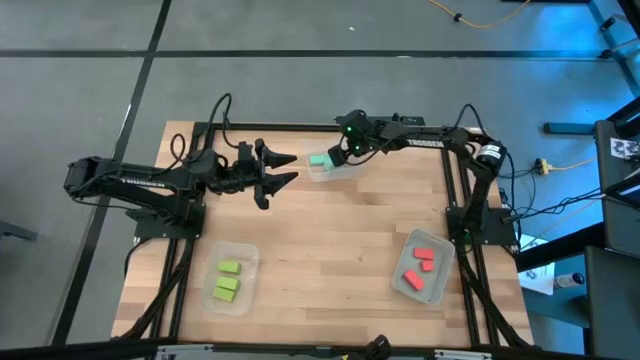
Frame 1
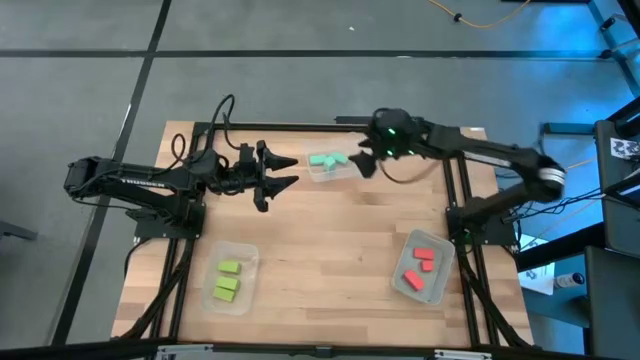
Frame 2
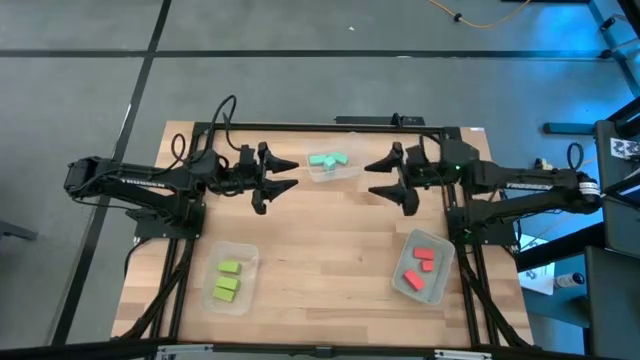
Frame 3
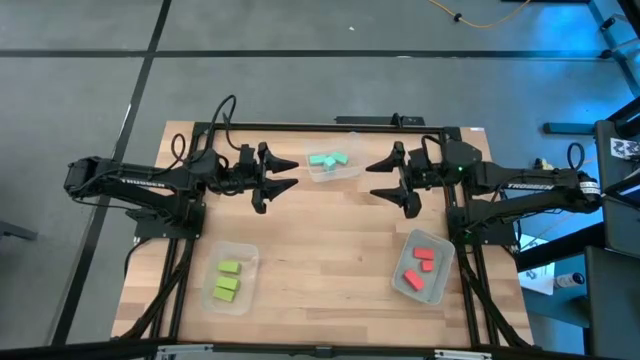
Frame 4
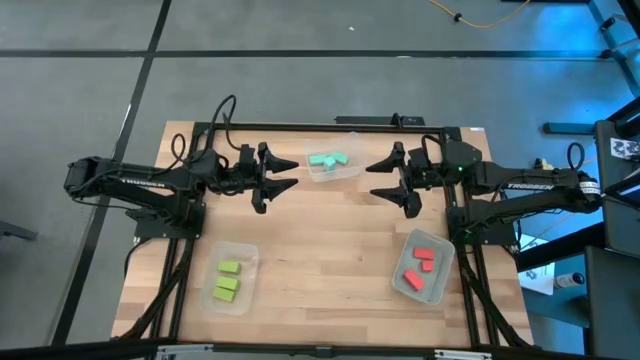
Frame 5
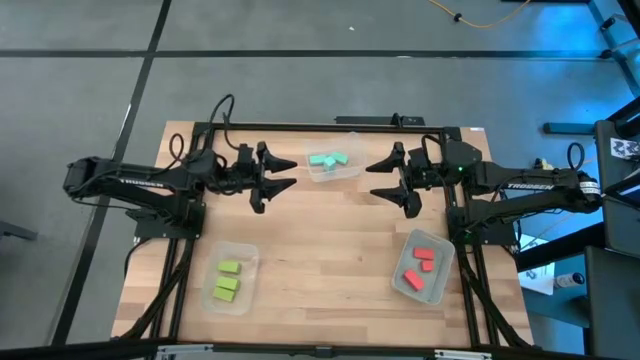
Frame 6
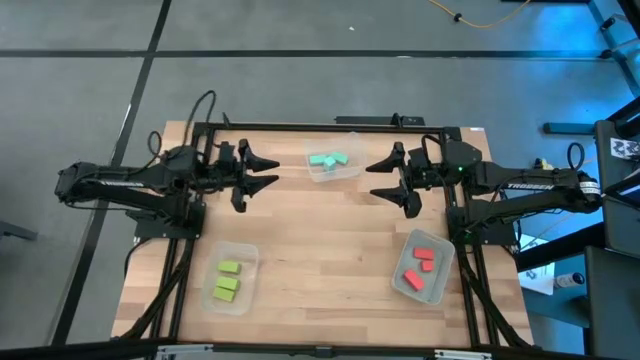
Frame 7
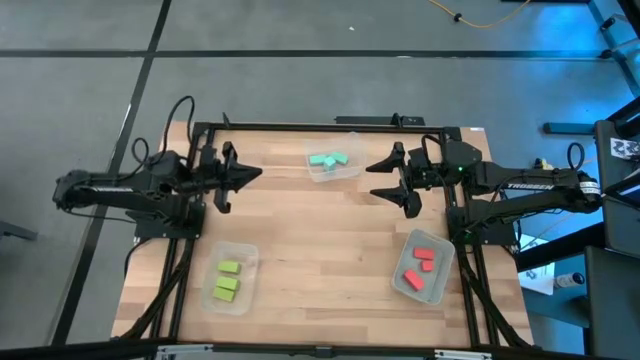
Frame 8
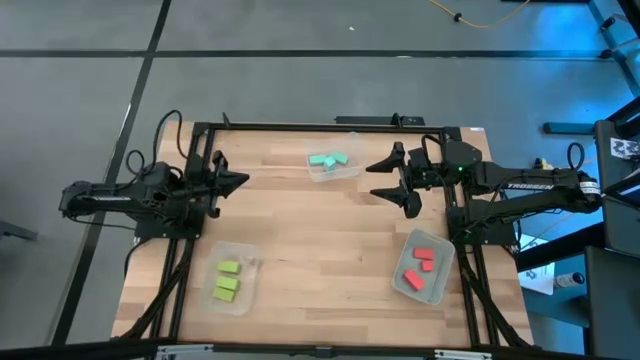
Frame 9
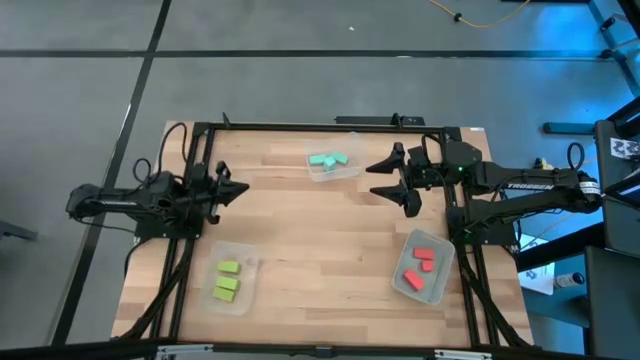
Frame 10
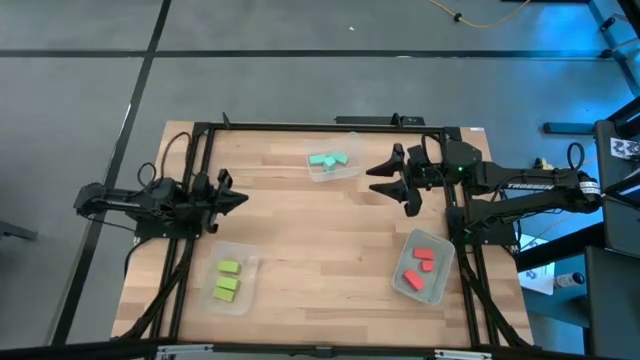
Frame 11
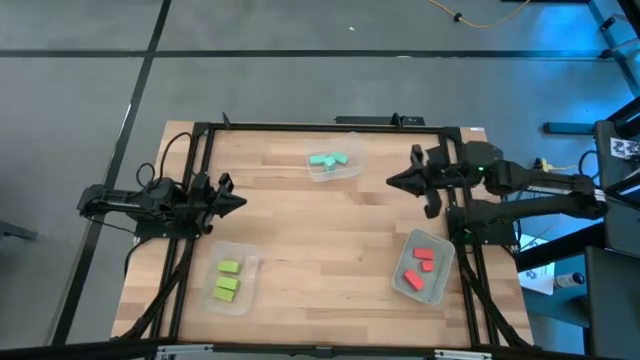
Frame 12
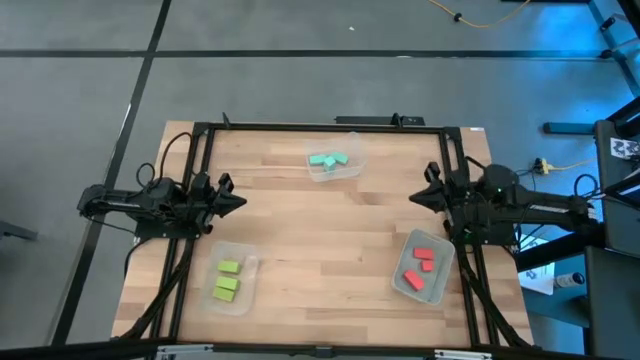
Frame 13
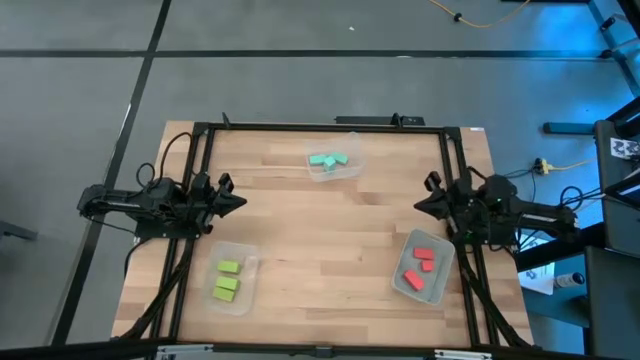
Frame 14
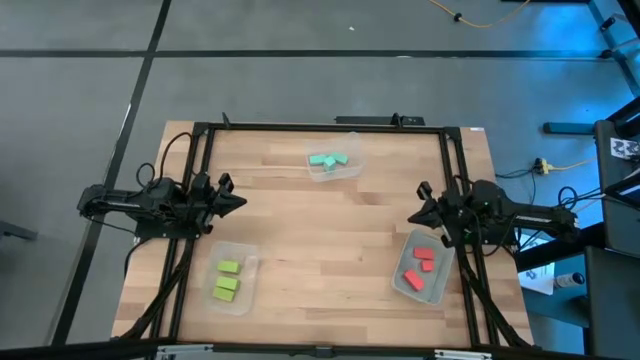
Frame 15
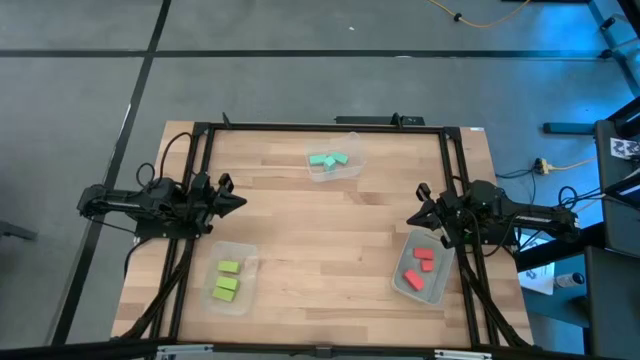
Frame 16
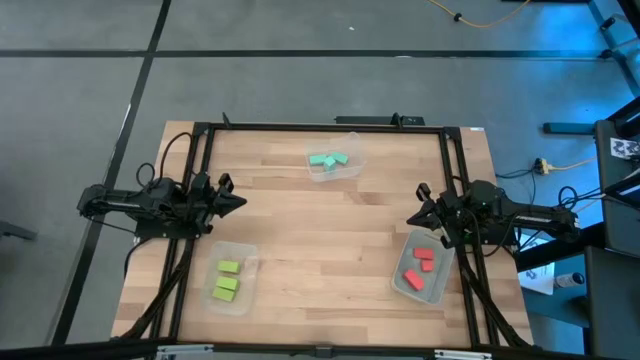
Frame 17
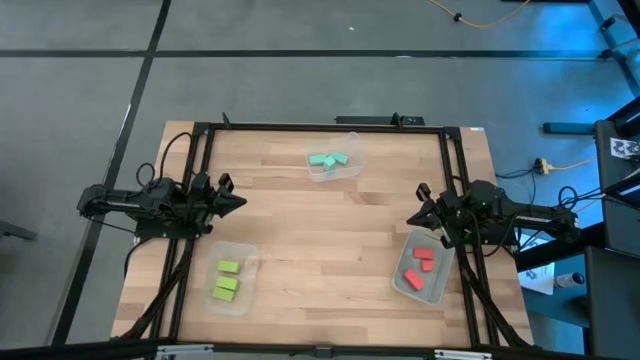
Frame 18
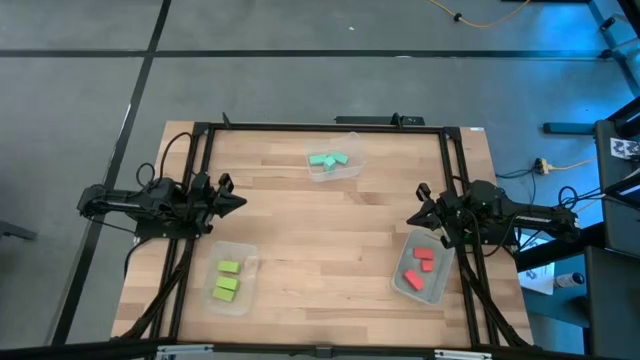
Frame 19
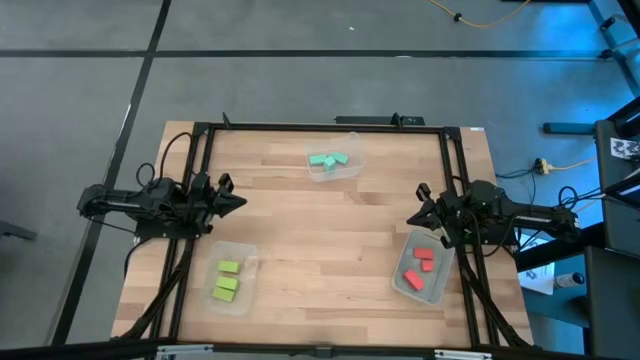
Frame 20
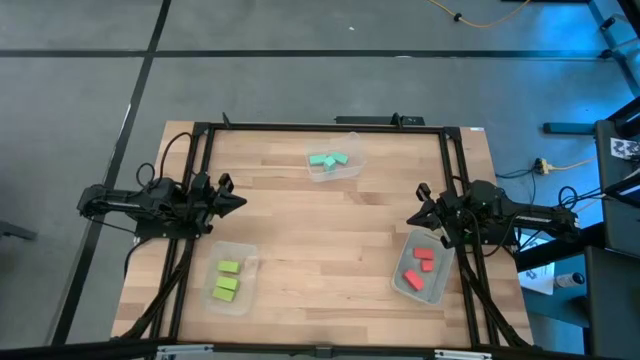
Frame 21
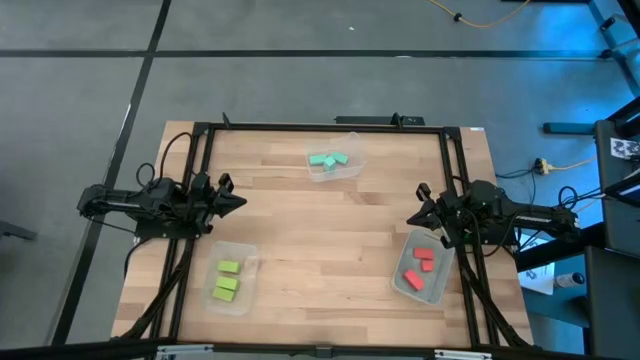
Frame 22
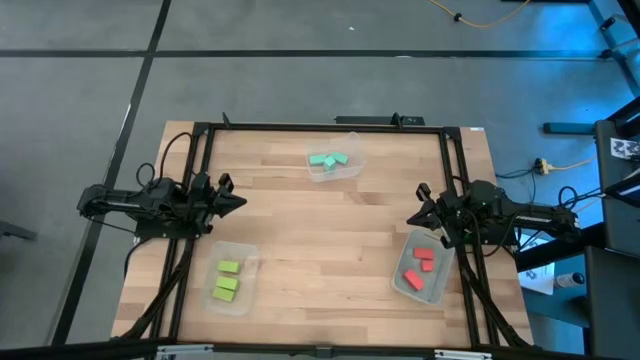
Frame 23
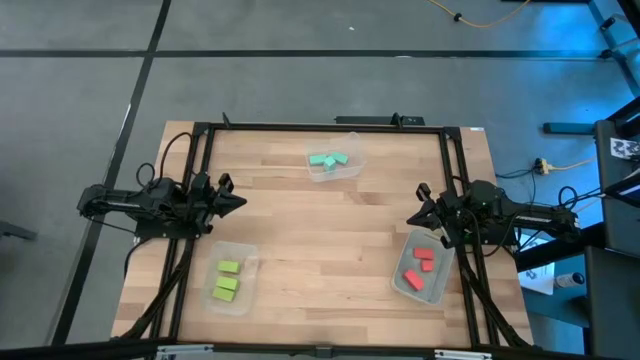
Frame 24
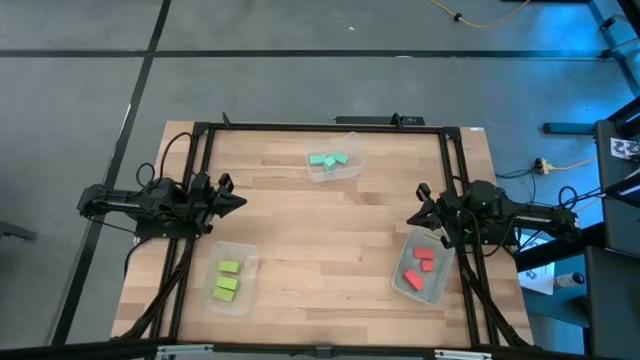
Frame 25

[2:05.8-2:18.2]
Task: Sort & place blocks by color
Return to Home Position

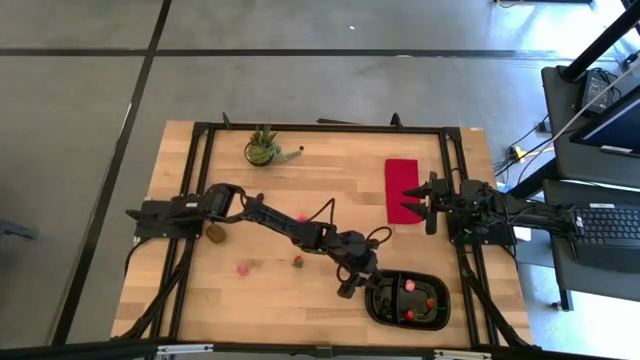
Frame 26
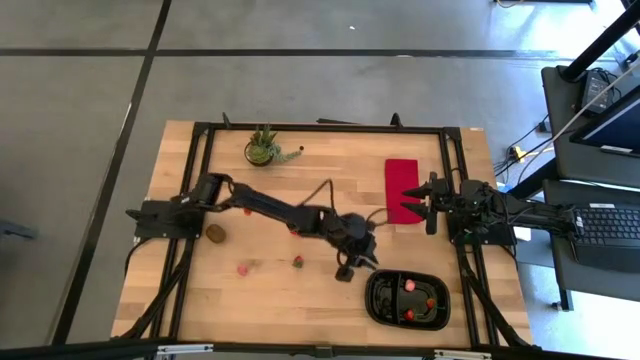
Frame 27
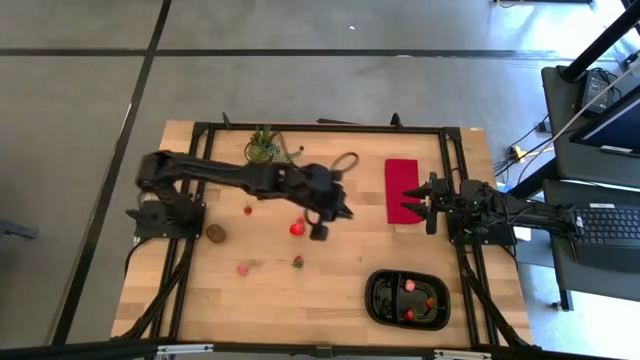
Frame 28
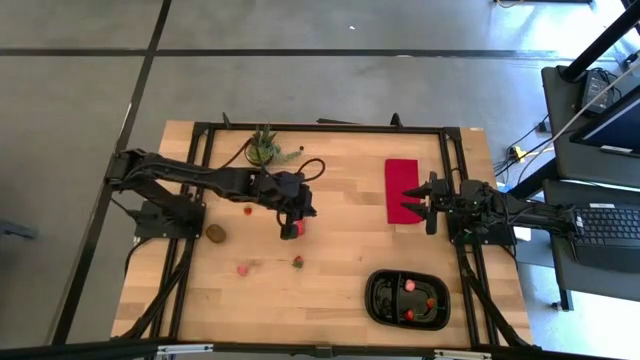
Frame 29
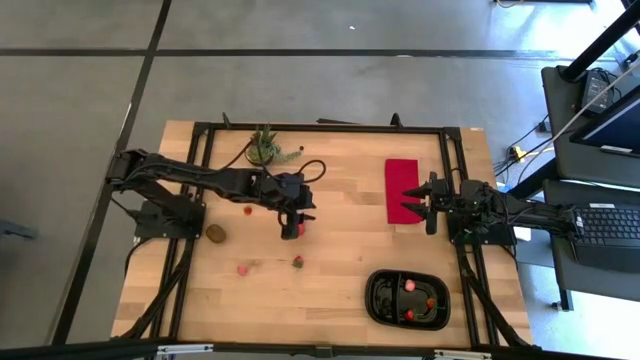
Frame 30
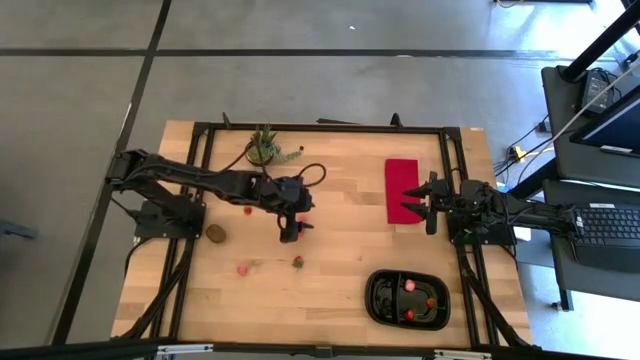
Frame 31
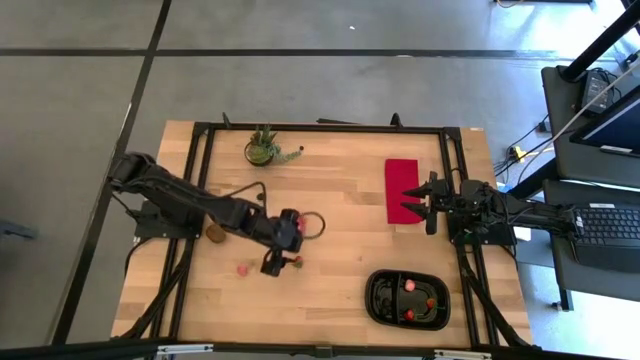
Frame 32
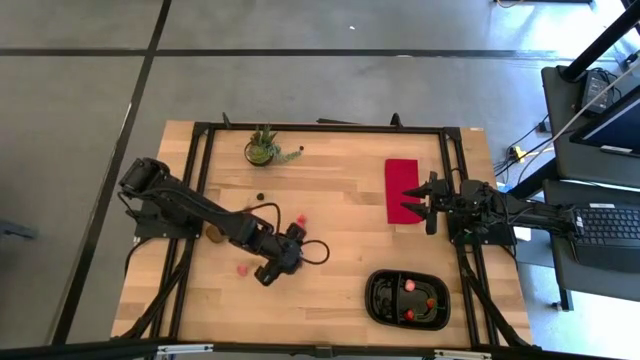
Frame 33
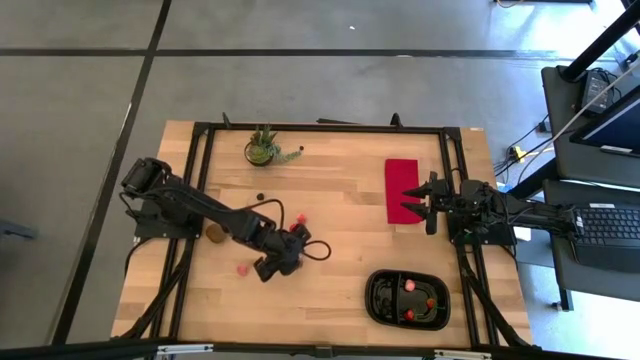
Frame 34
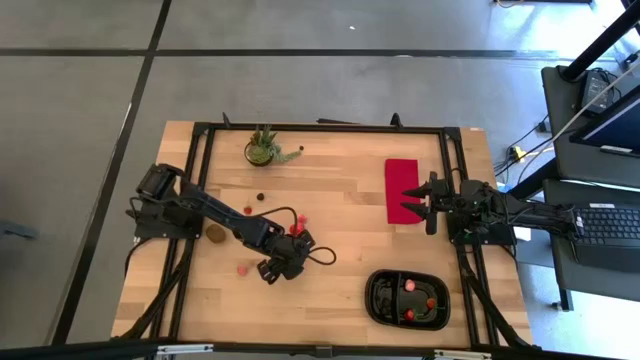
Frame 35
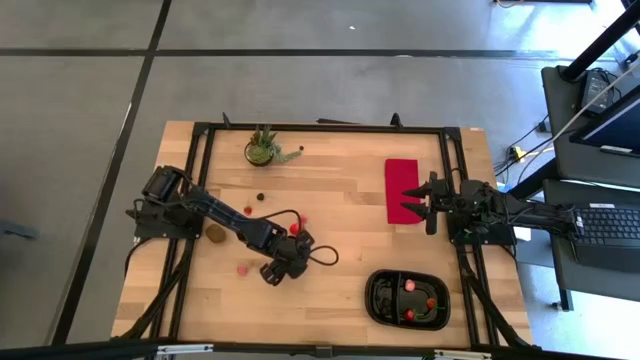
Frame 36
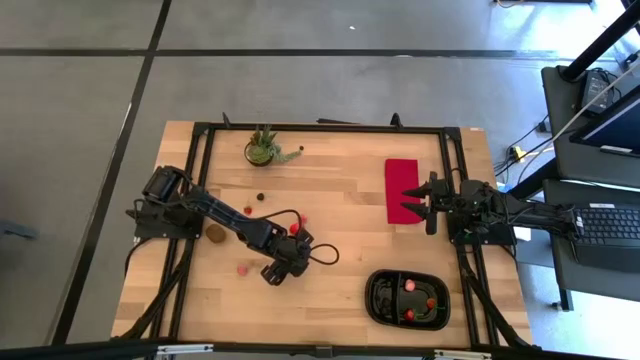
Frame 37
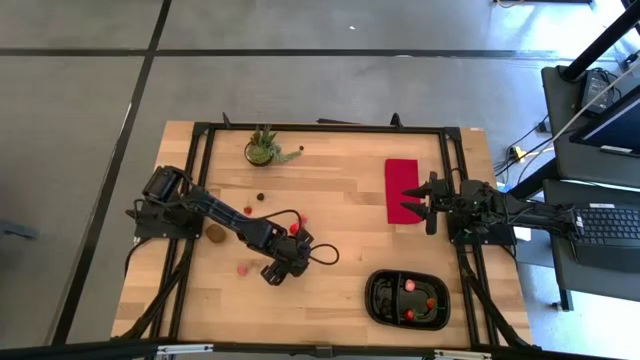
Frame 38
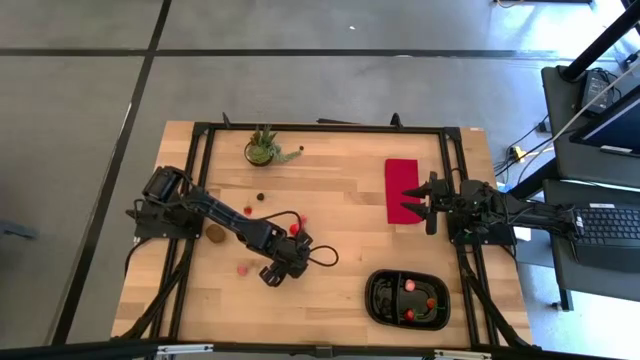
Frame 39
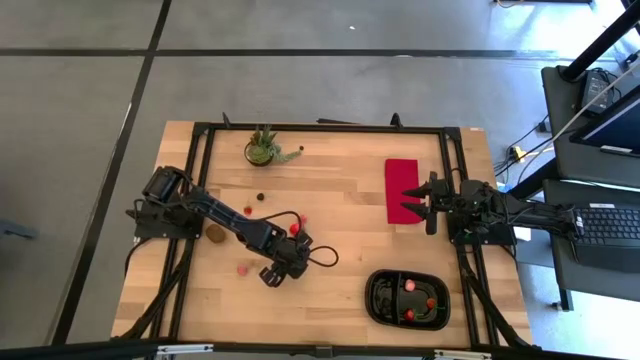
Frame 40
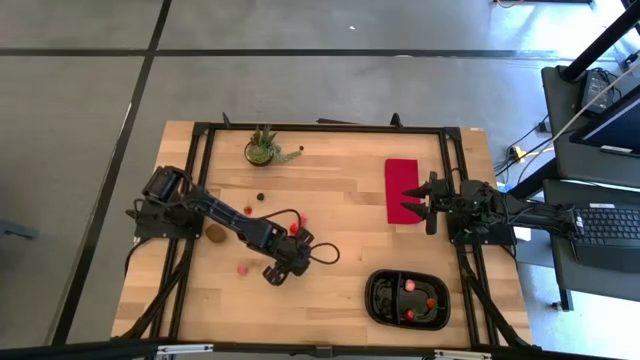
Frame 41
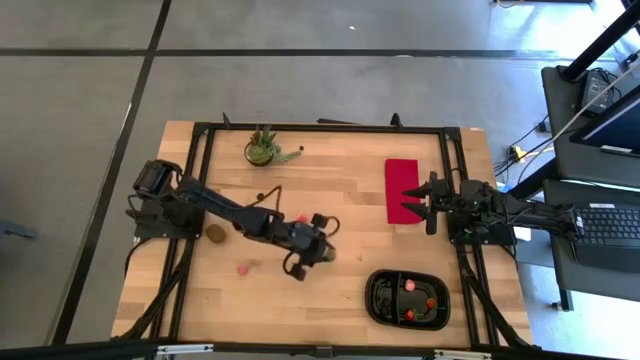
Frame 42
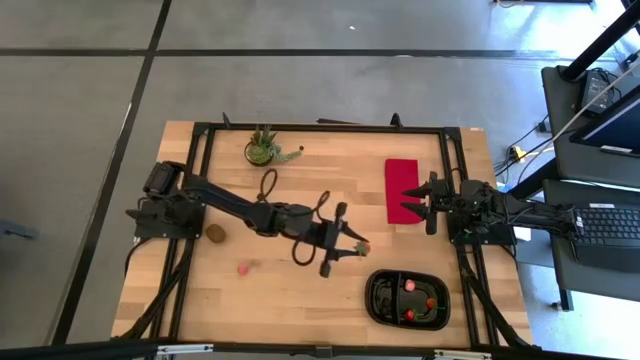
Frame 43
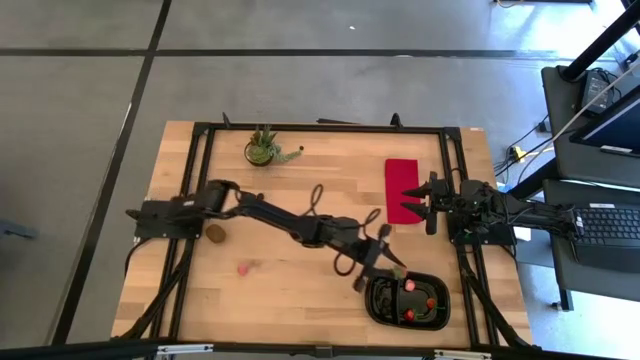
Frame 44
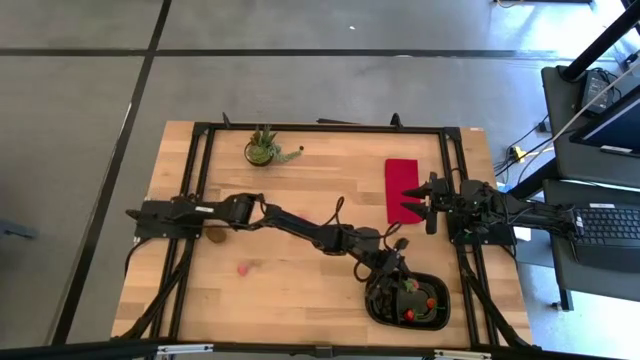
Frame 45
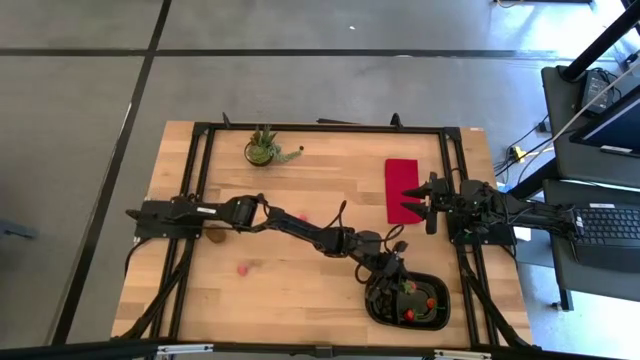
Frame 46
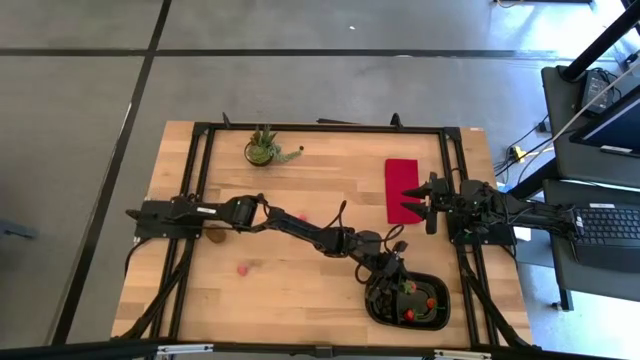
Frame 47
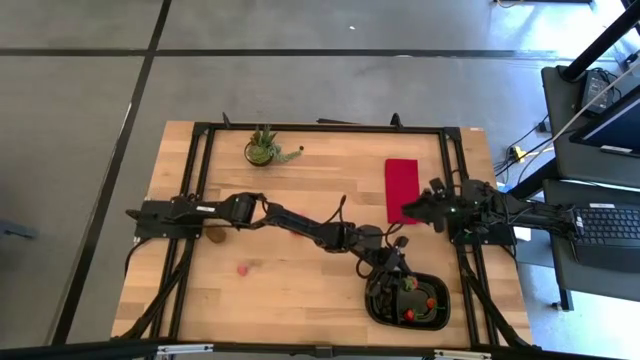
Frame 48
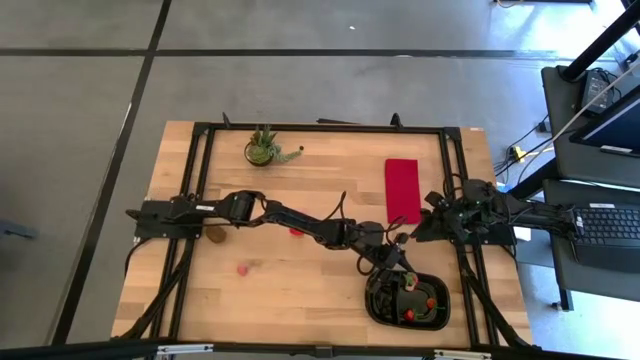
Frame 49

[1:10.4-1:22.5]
Task: Pick and placing Produce into tupperware
Put the strawberry into the right of the black bin
